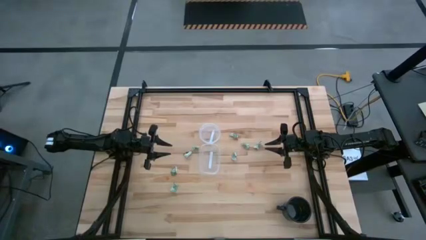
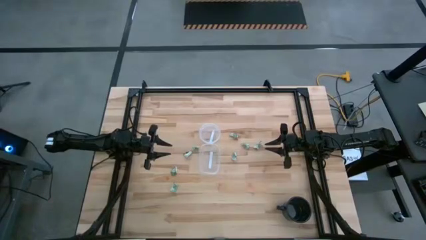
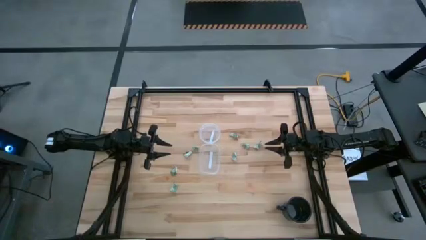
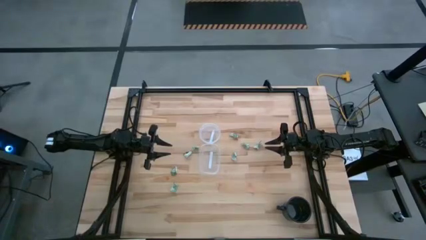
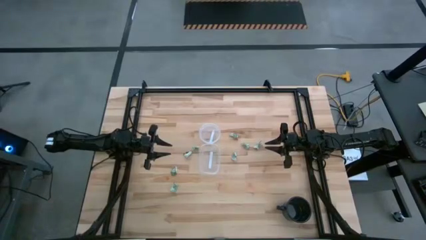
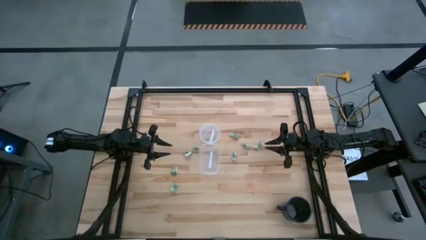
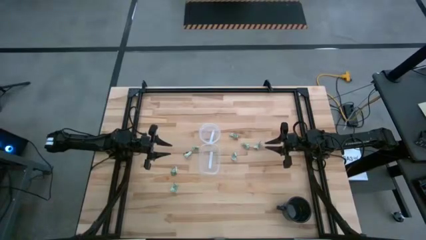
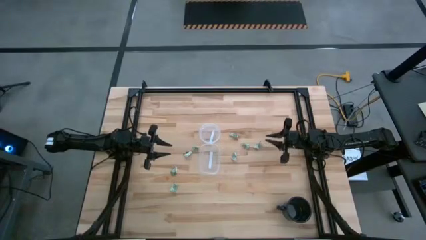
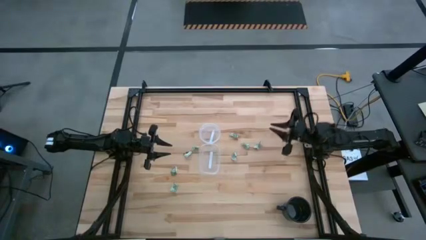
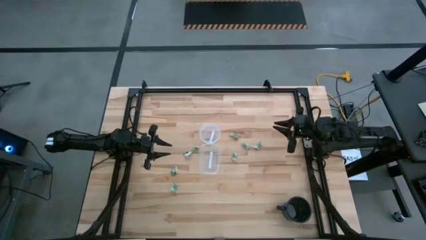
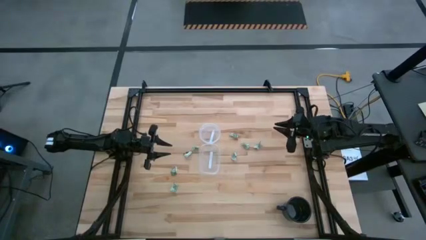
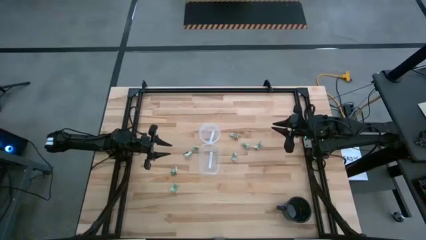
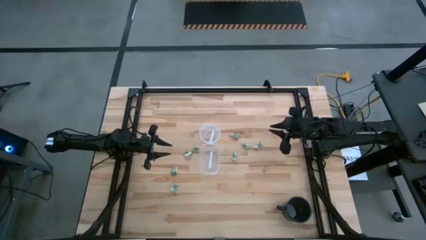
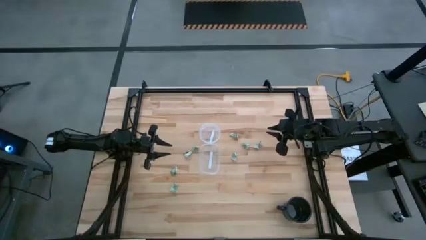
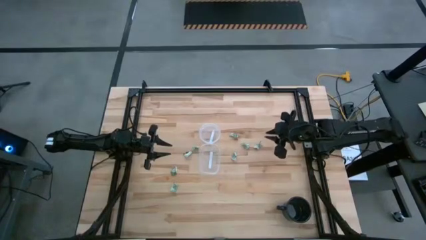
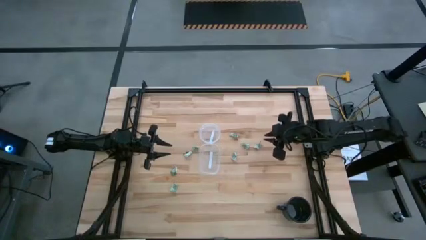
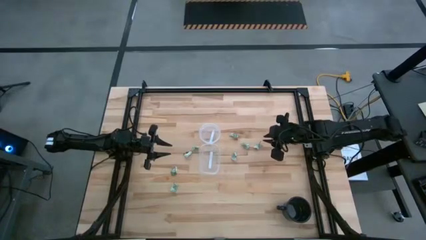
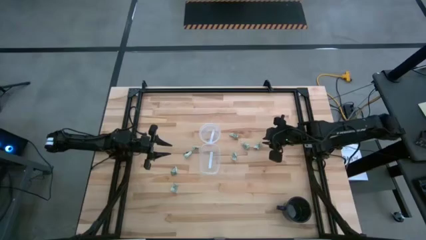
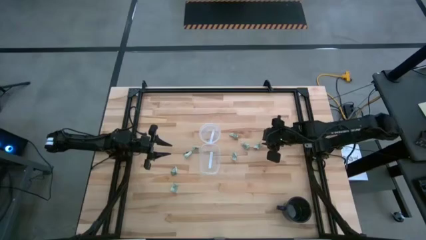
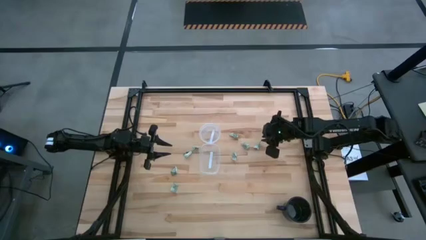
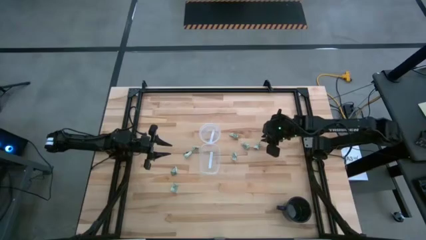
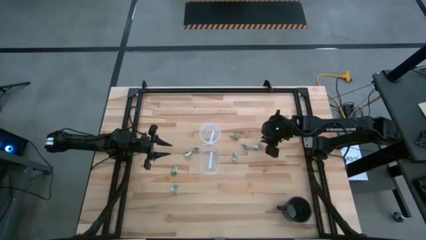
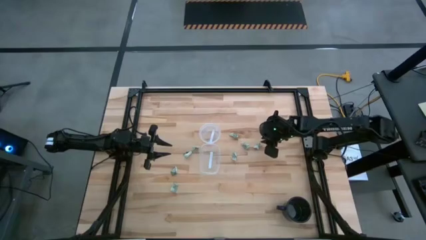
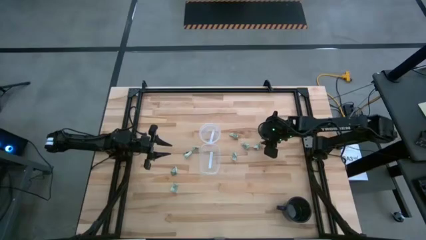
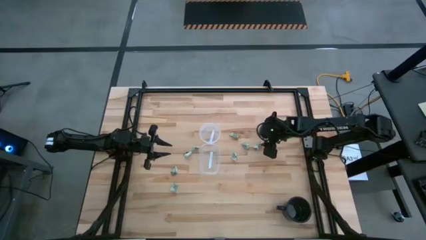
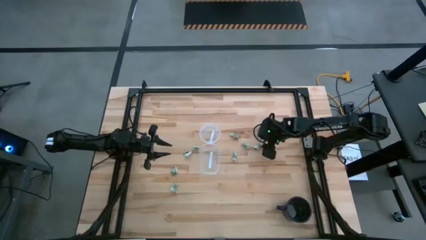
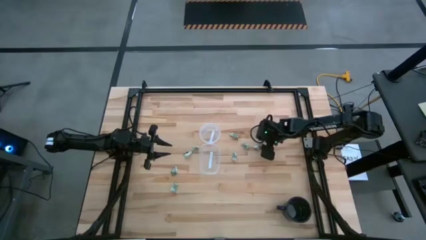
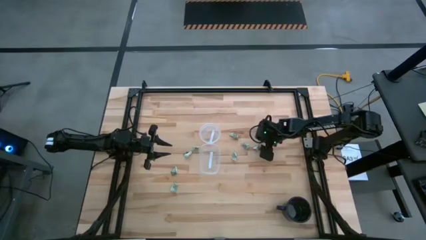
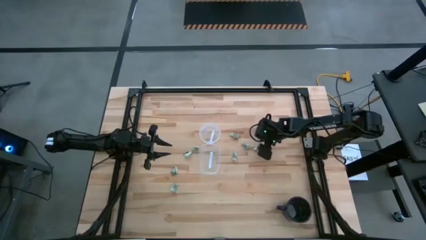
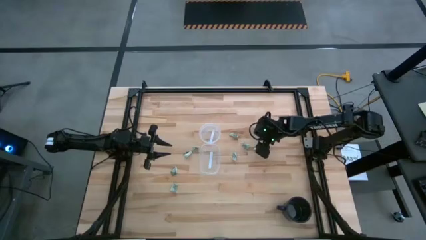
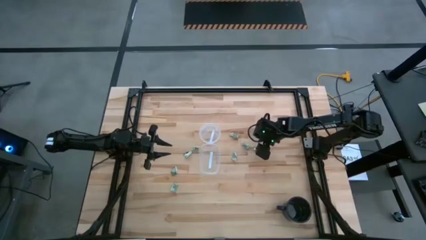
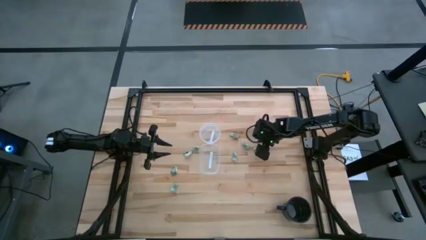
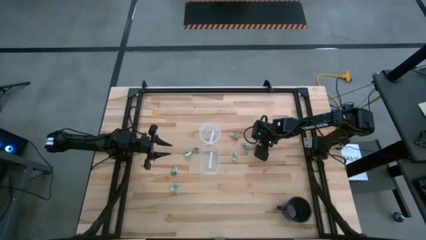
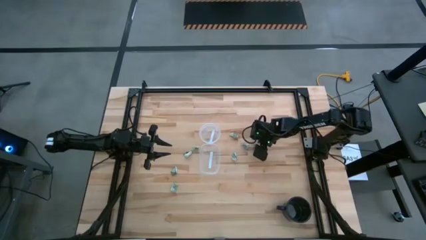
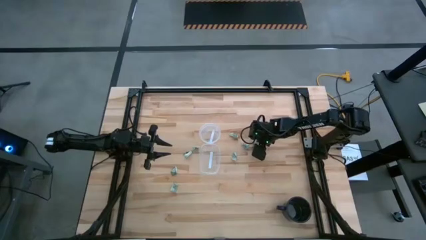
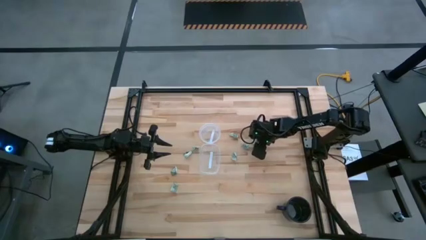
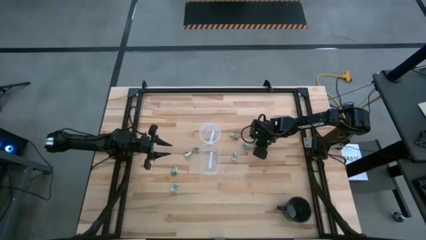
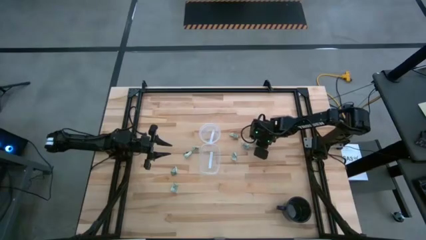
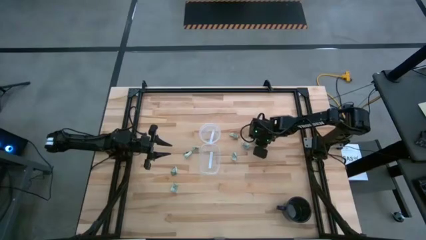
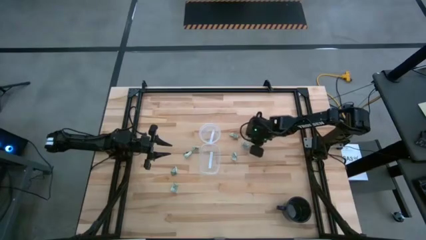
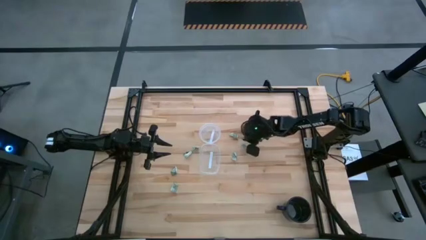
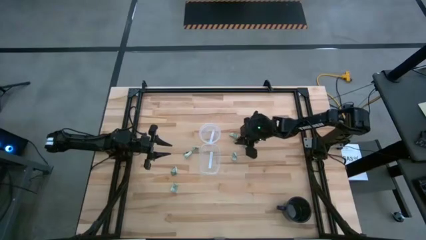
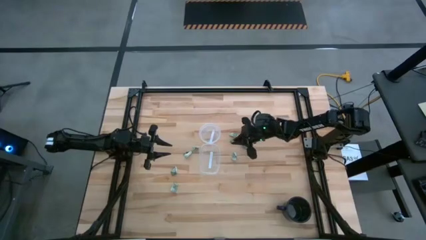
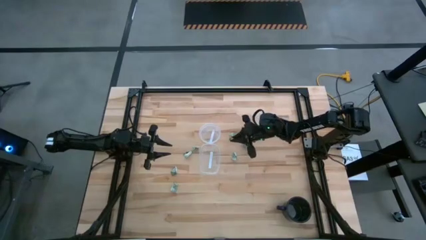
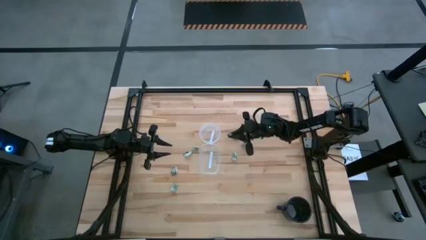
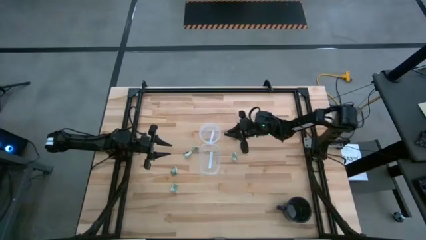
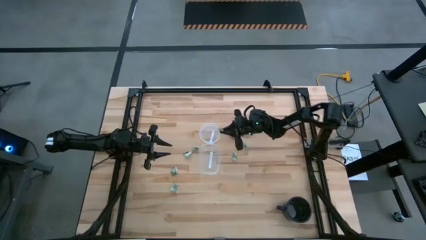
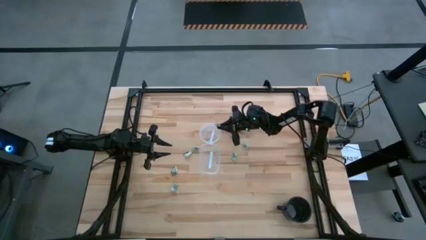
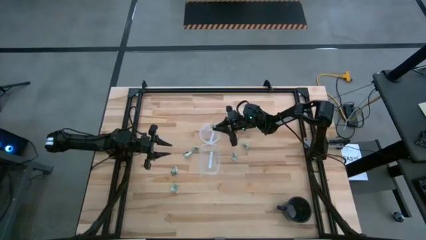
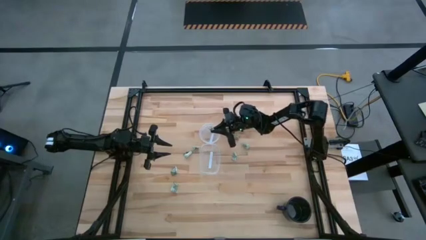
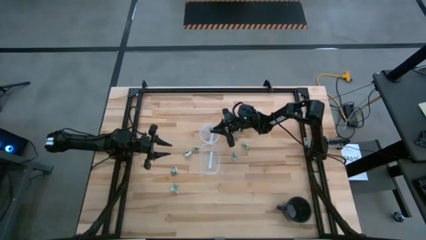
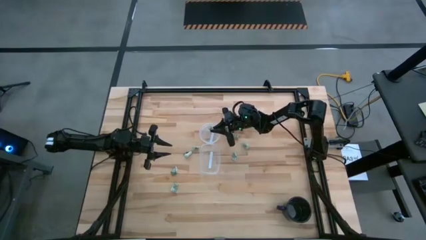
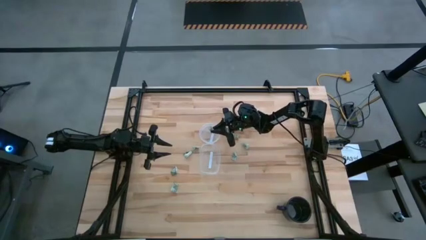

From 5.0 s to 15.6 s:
Task: Pick and place items into bin
Put the stevia packet into the circular transparent bin

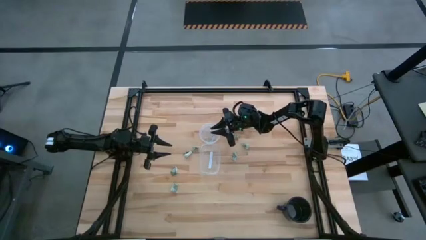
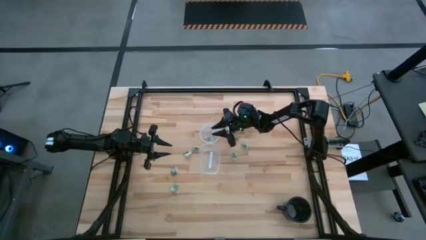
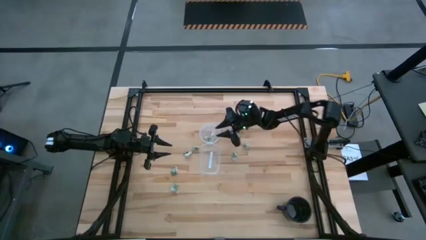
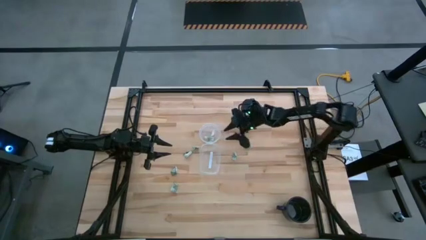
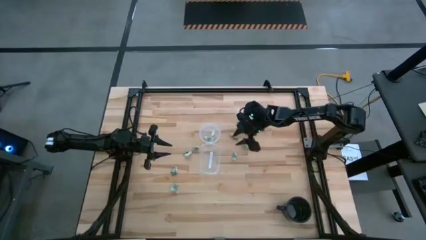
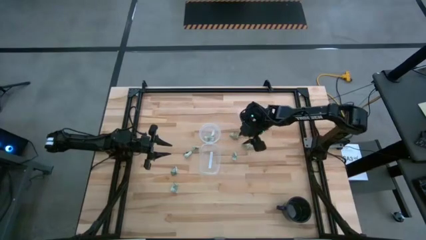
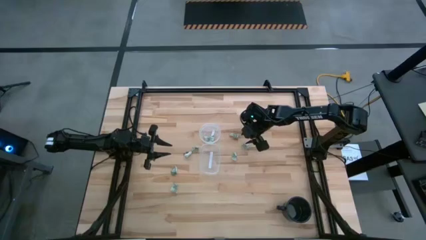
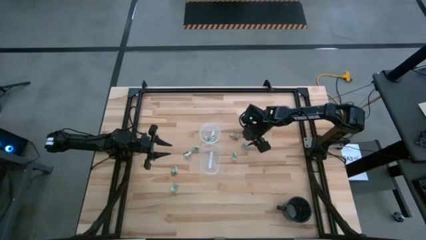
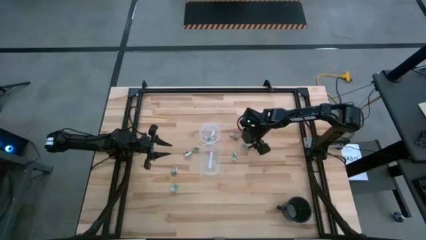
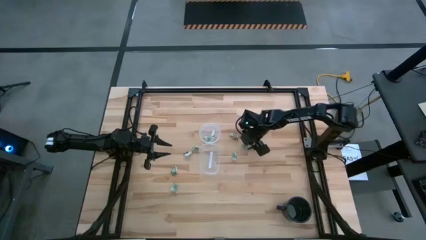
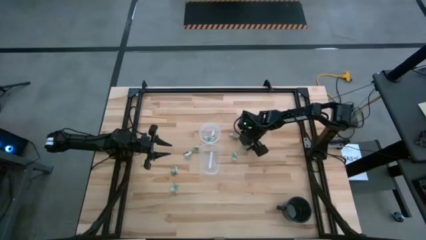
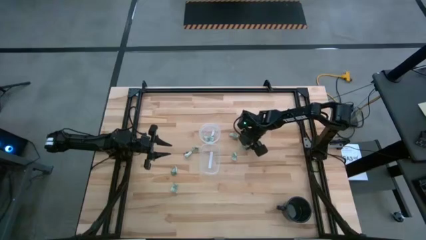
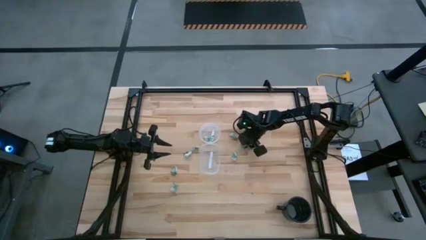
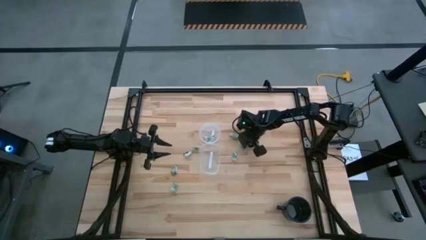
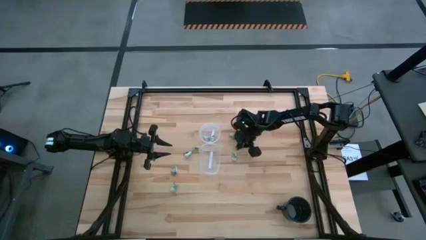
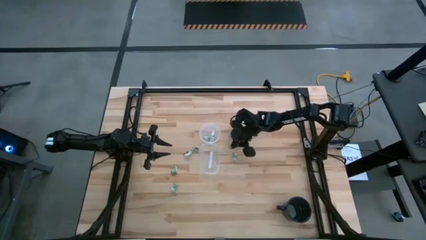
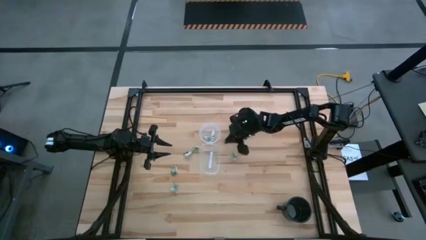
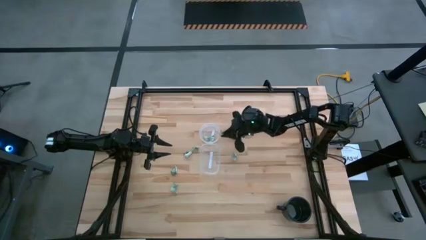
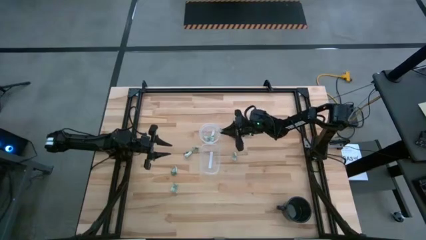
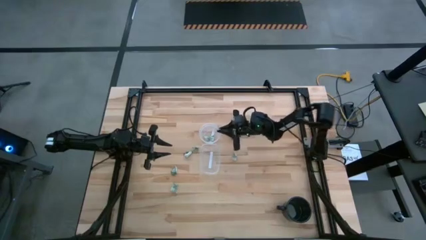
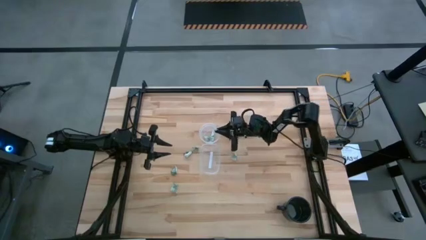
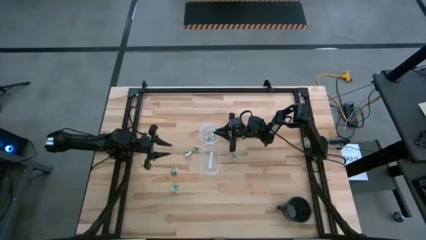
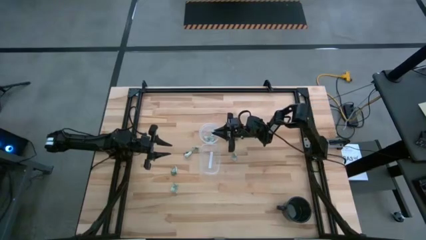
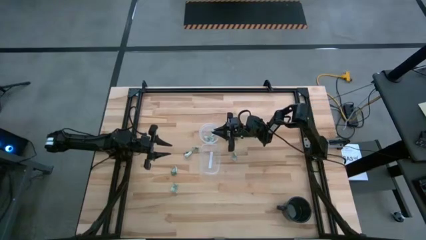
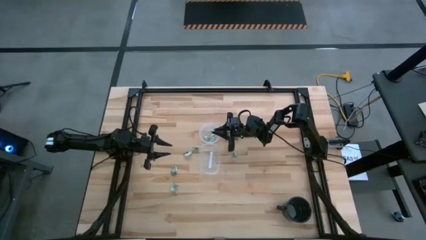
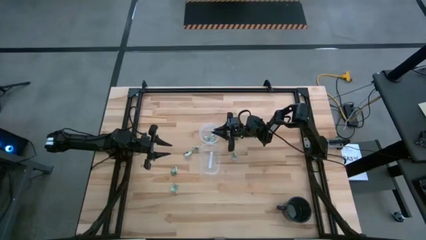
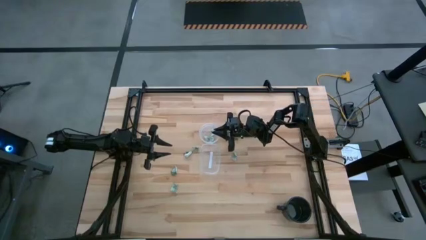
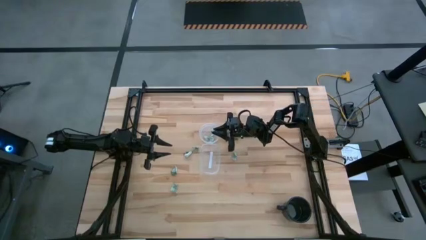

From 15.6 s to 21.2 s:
Put the stevia packet into the circular transparent bin
